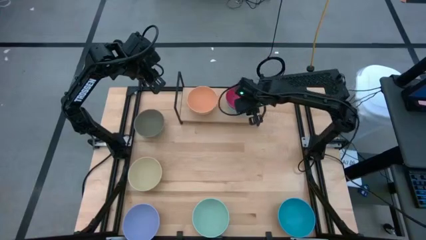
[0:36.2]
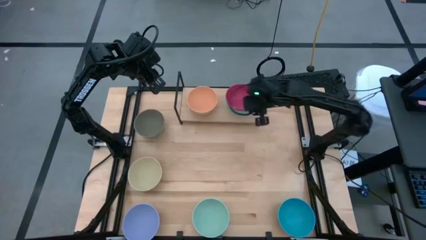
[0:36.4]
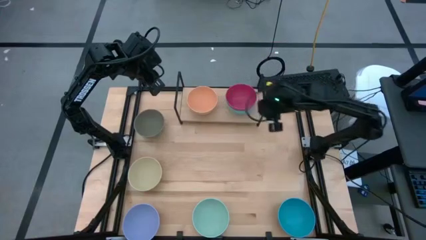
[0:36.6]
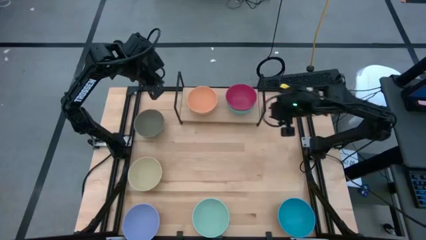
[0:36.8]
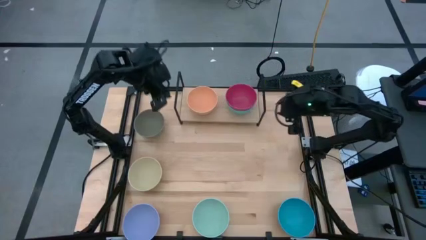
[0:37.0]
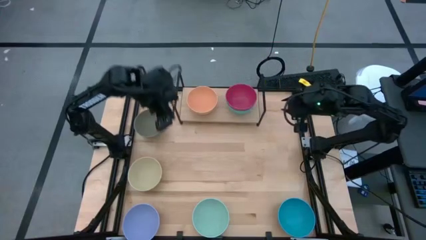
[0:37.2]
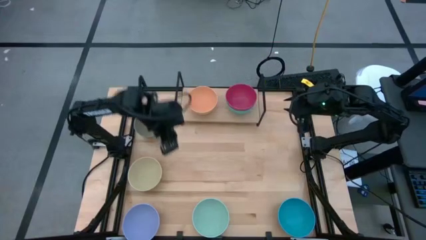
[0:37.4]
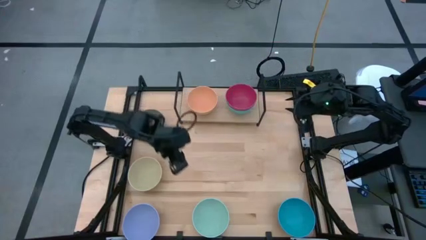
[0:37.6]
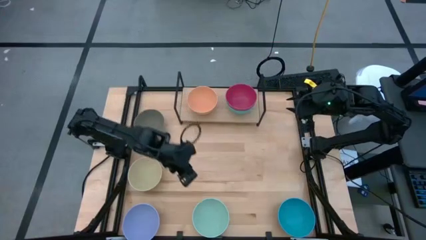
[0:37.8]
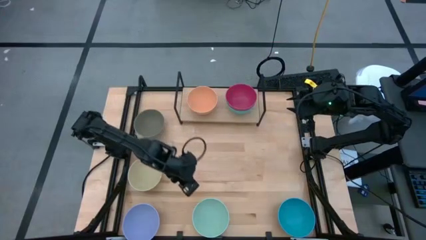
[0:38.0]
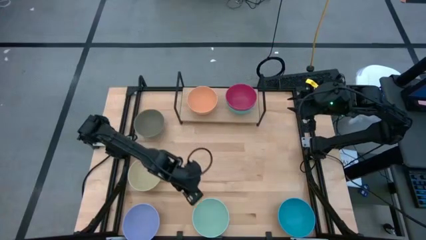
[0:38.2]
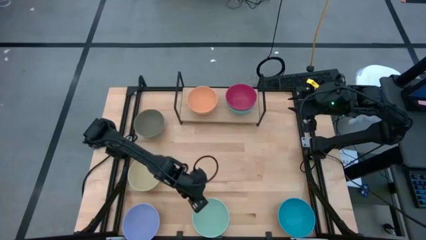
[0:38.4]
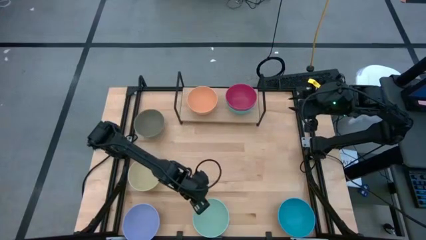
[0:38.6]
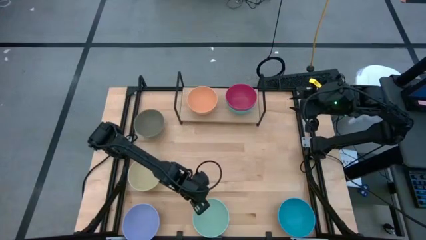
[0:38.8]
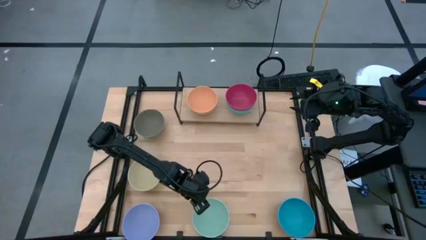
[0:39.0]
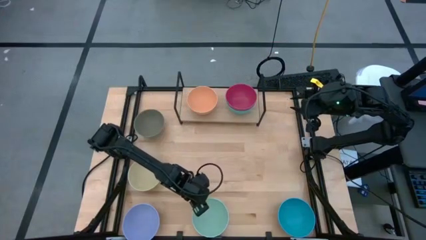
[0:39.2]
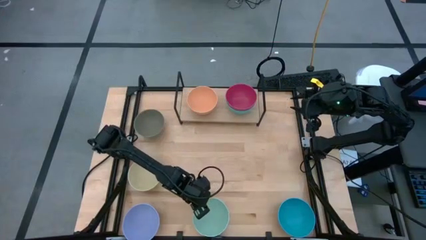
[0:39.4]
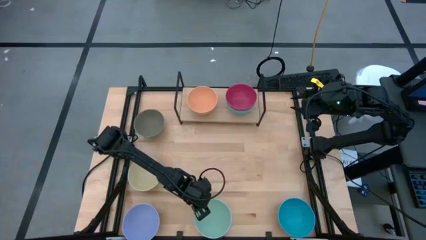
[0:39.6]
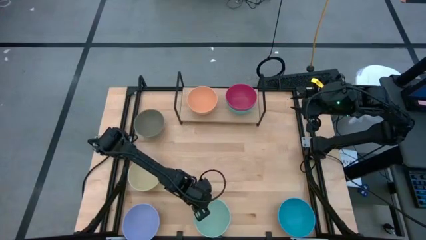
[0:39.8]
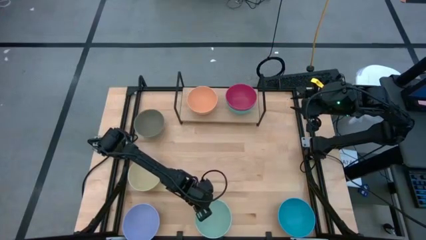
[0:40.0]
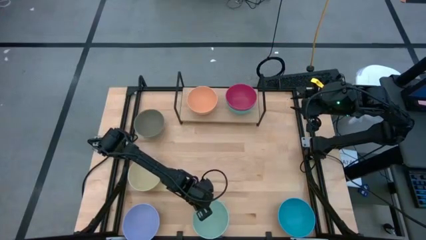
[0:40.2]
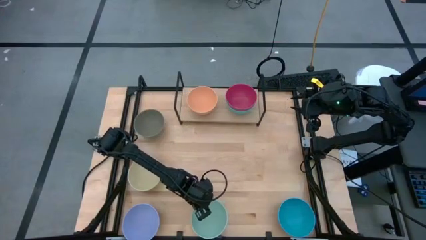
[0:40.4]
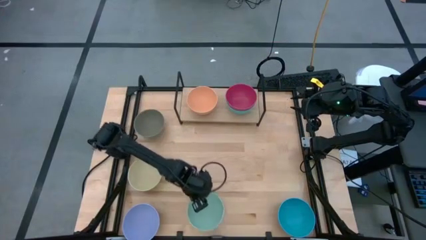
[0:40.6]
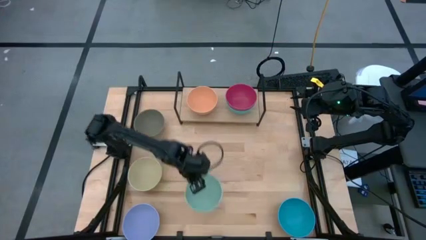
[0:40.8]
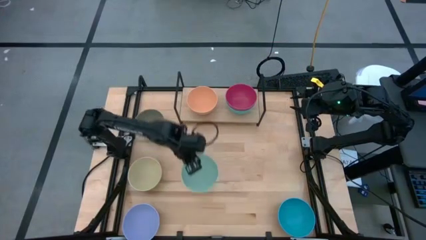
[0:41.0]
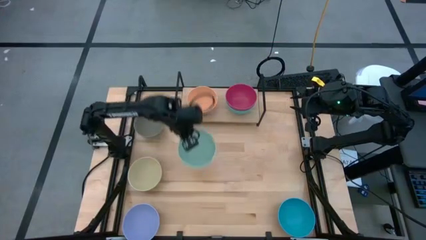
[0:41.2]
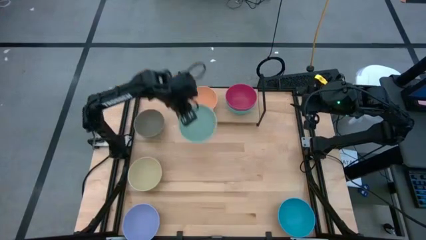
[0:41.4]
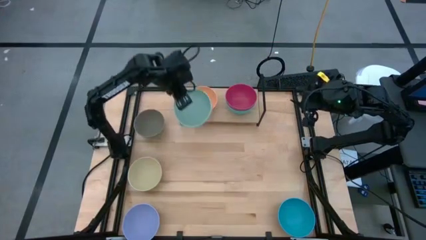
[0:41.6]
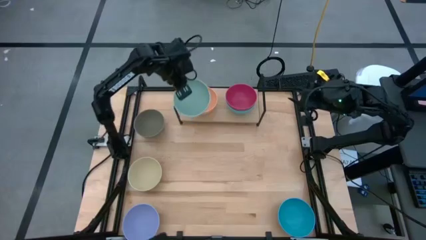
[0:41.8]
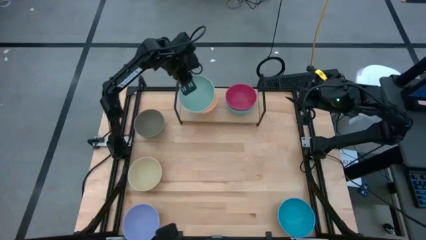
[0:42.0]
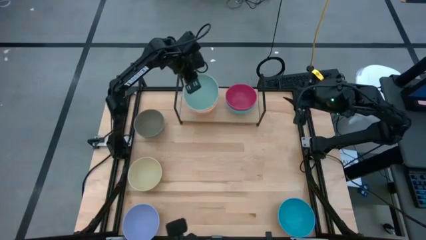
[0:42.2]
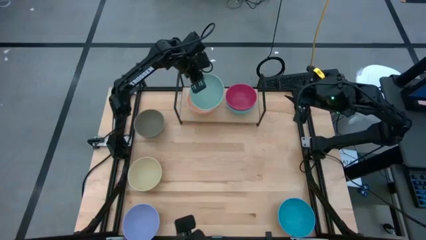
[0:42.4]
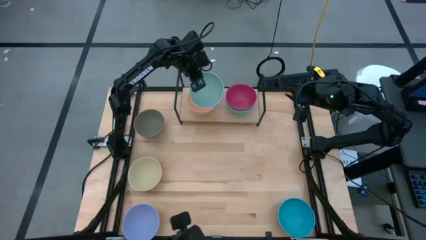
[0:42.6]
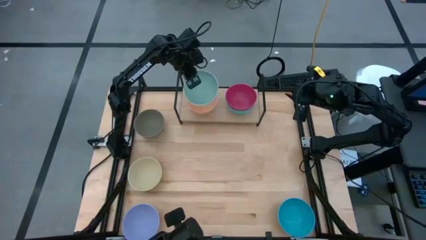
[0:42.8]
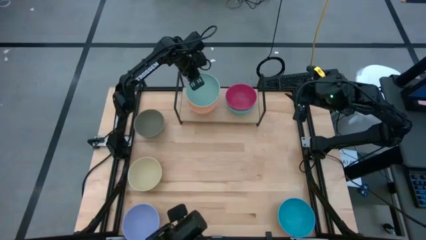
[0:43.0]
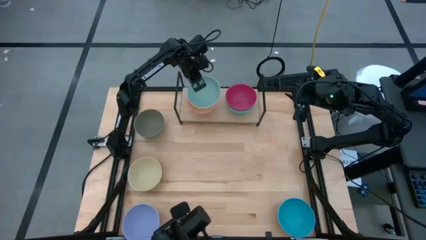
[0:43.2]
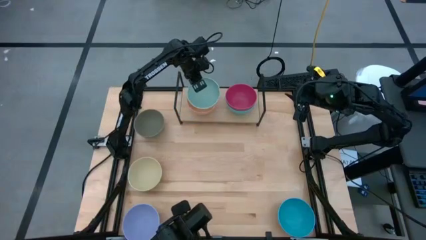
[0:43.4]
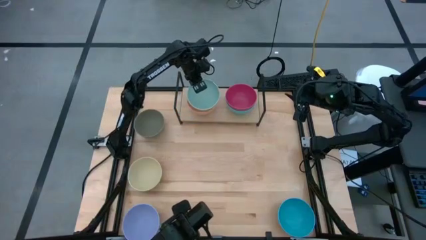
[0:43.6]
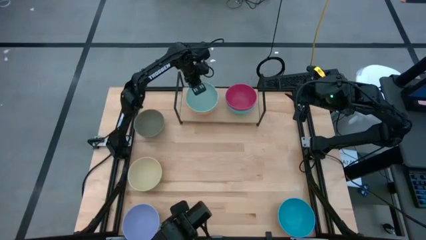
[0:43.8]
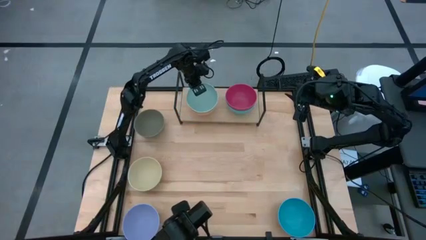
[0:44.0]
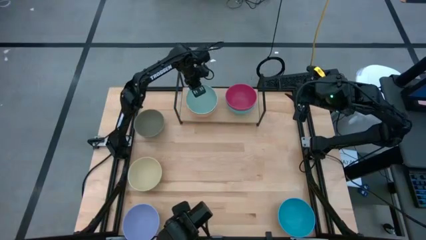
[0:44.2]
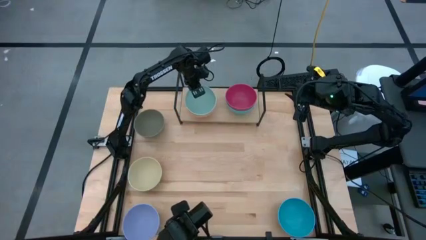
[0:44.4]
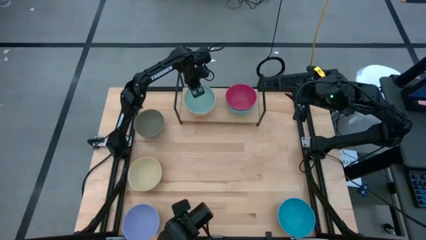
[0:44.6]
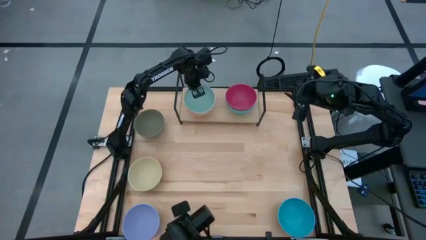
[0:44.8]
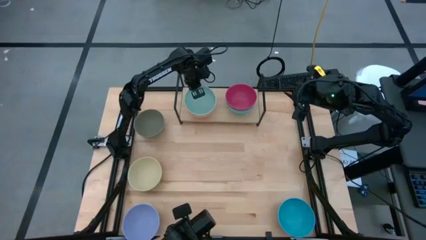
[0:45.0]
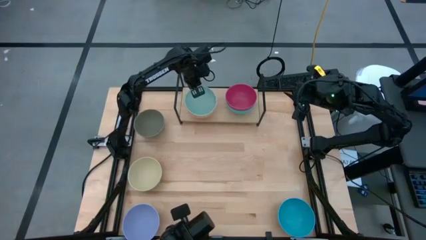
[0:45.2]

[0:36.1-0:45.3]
Task: Place and stack bowls onto a shelf
Stack the light green bowl on top of the orange bowl on the shelf

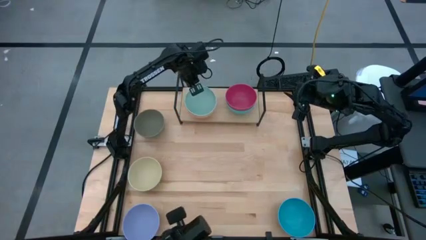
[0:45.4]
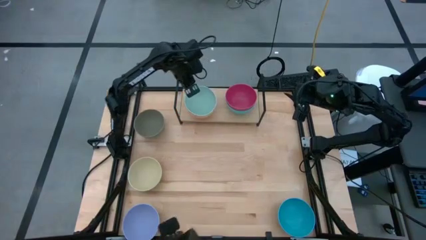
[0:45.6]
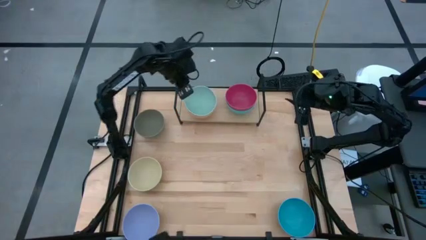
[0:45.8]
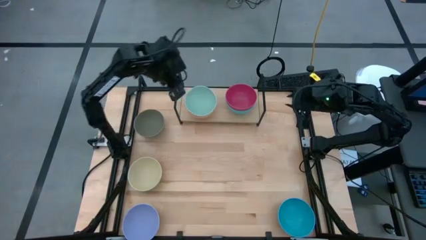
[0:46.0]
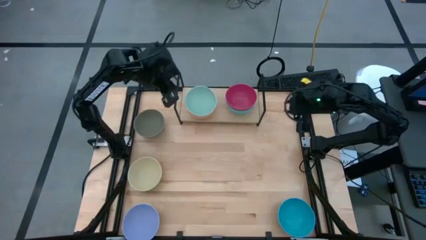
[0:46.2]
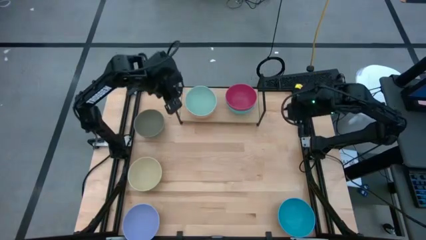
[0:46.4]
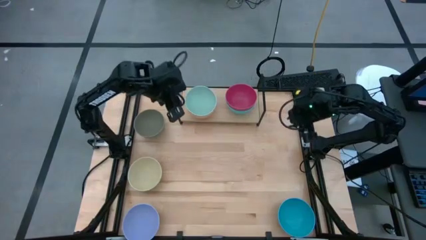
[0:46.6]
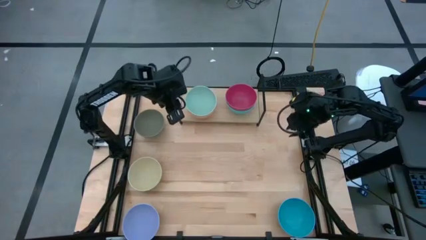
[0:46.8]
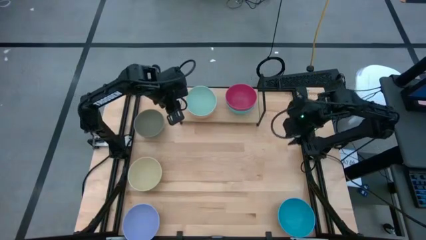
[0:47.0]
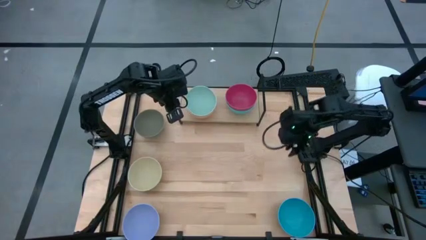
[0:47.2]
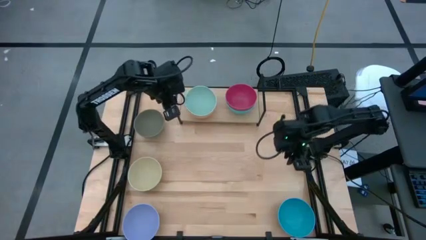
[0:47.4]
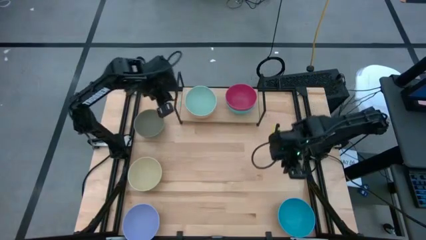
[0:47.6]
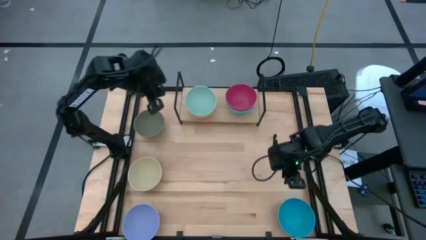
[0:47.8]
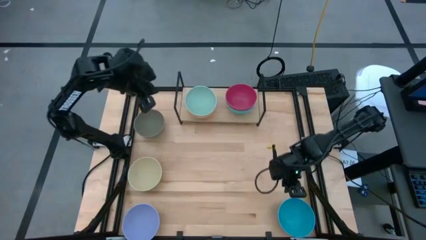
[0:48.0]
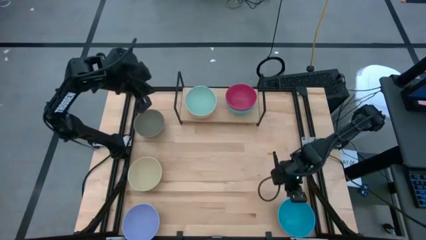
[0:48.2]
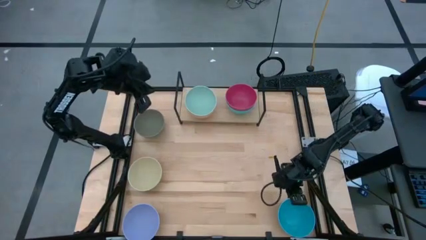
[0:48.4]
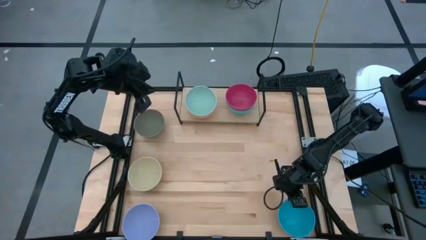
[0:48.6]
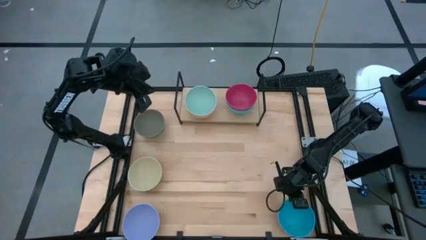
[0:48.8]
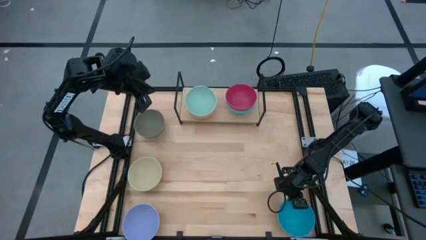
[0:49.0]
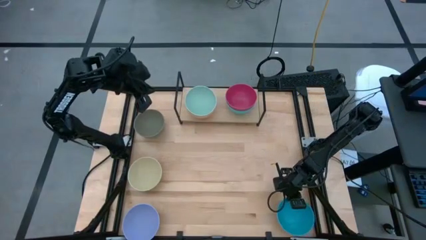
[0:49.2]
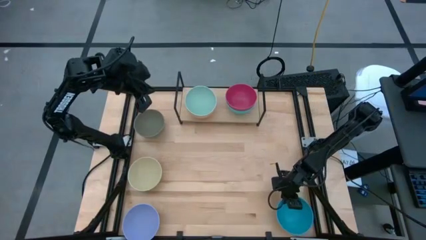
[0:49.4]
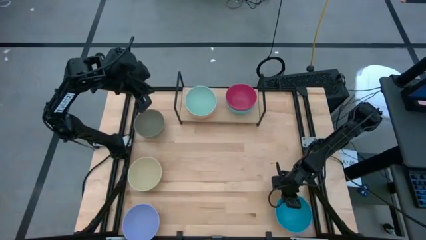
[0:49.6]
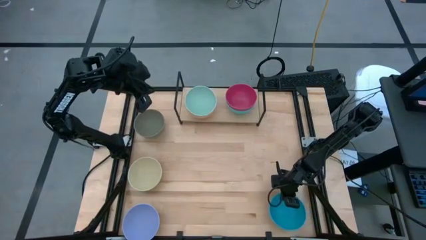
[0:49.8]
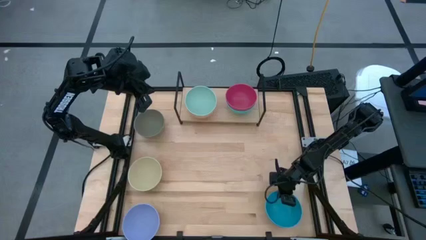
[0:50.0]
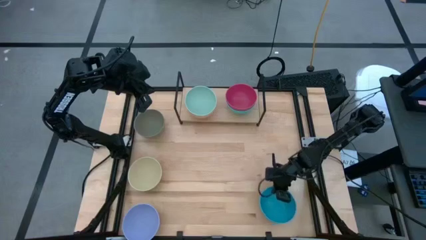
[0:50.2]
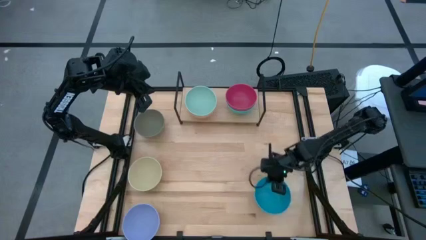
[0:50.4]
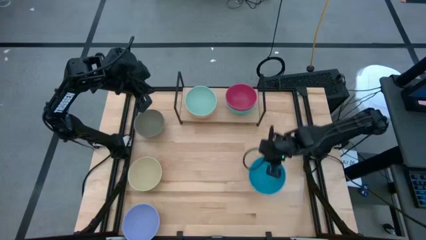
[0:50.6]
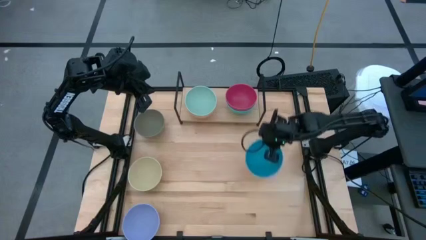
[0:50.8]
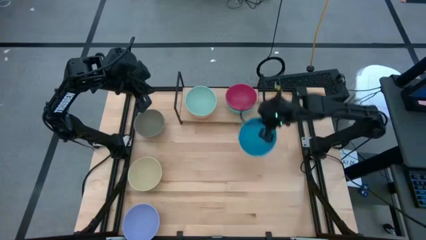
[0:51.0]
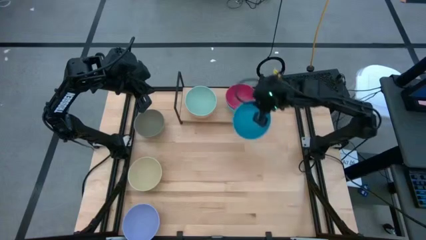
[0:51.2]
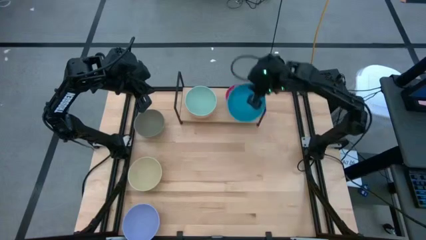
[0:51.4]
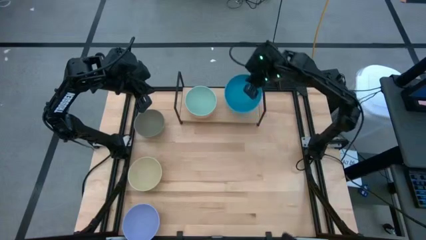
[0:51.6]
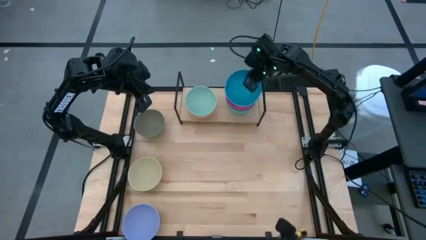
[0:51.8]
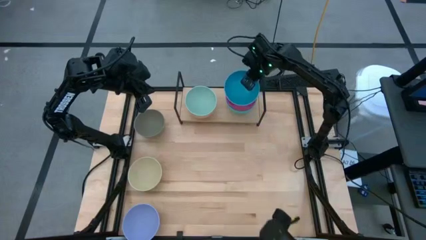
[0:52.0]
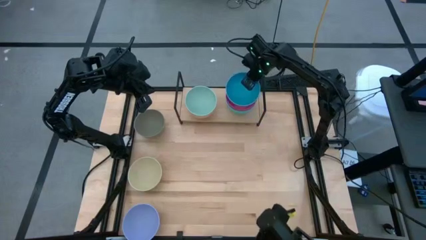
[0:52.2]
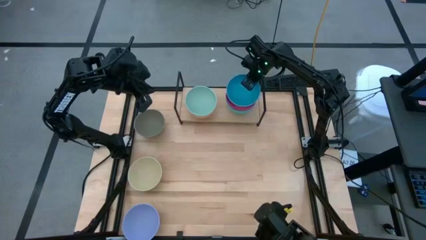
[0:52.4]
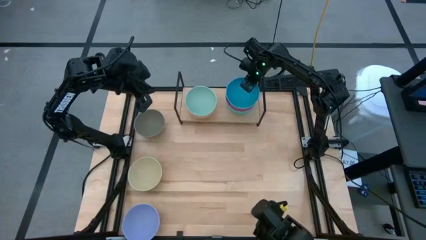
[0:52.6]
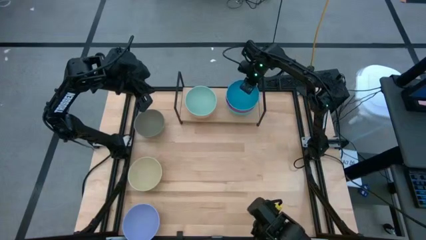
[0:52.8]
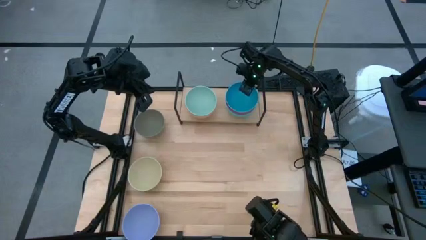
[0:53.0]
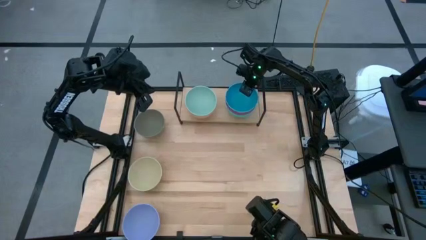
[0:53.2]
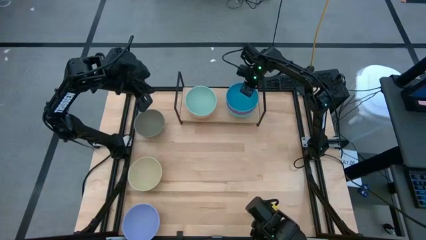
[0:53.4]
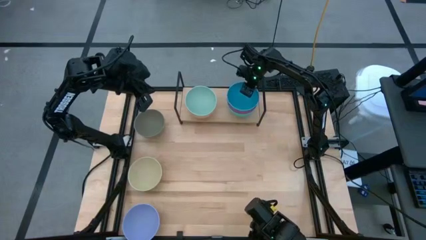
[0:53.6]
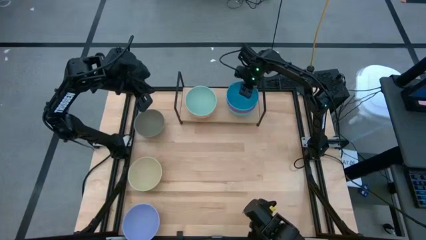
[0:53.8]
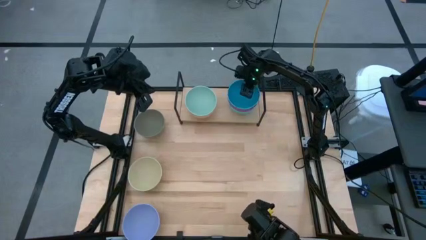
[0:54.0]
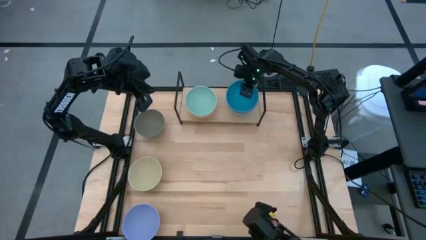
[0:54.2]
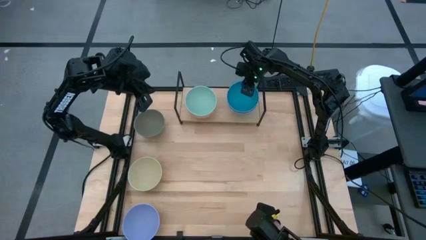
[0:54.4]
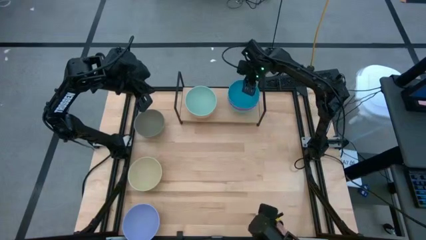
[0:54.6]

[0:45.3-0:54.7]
Stack the blue bowl on top of the red bowl on the shelf
